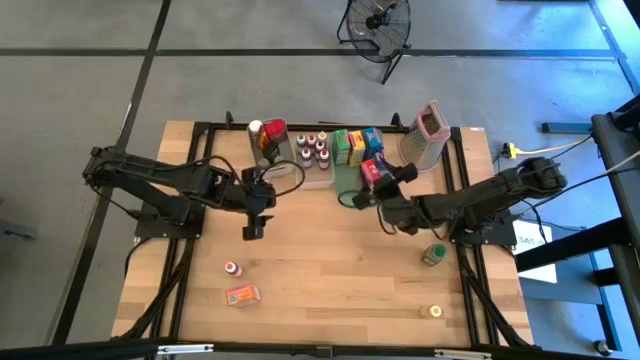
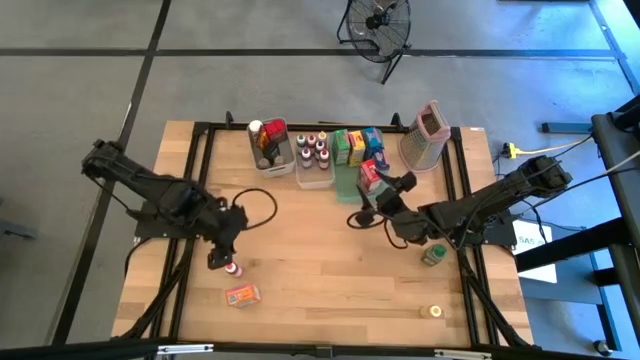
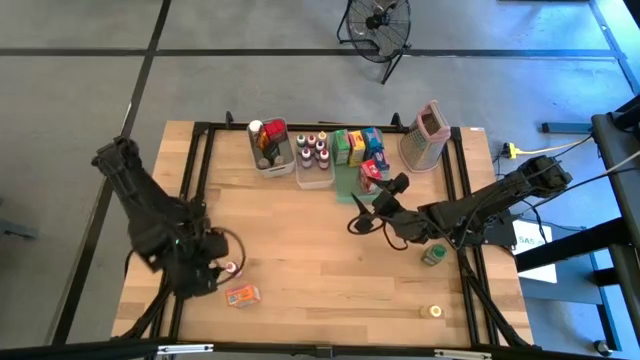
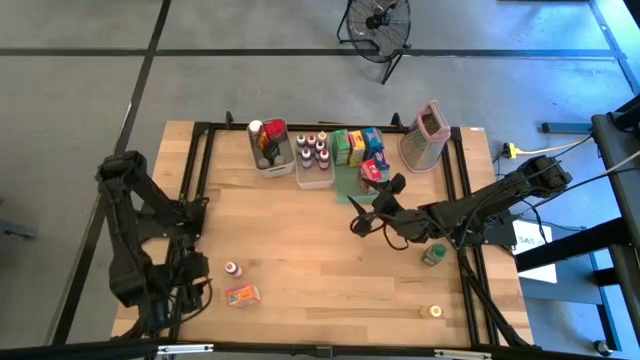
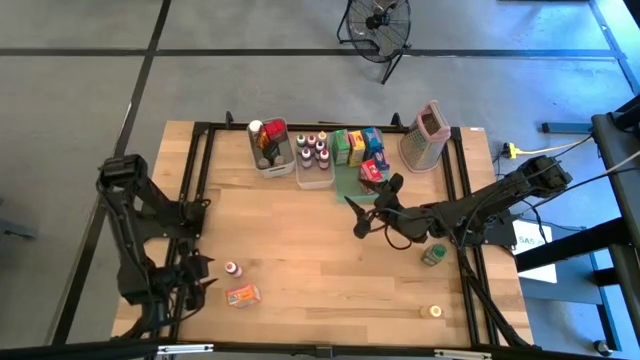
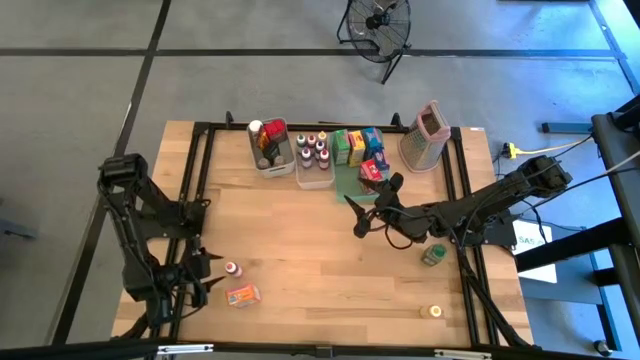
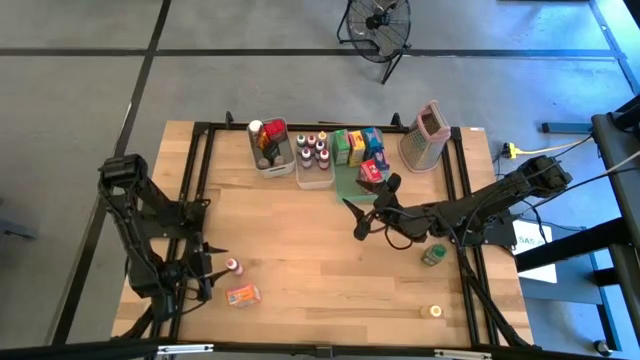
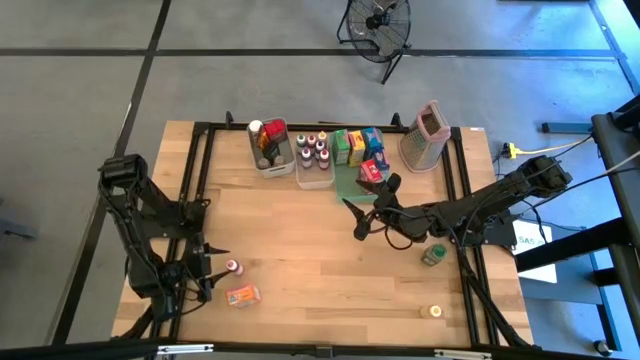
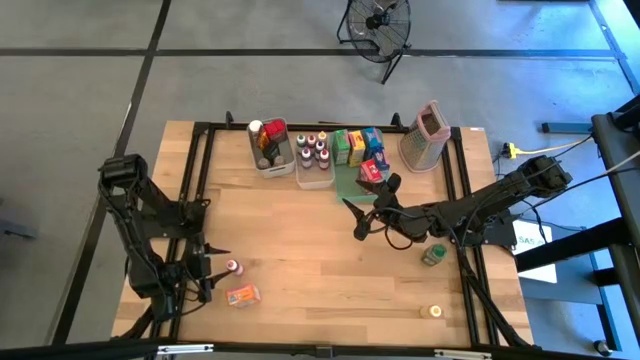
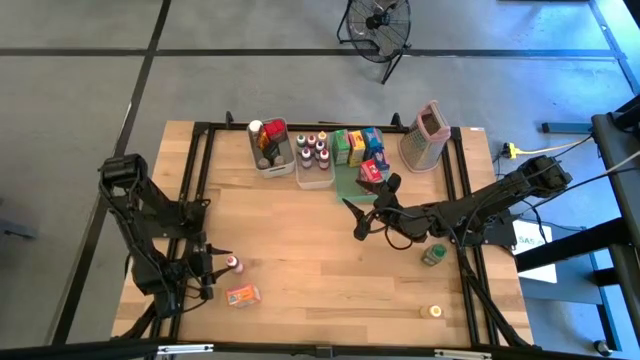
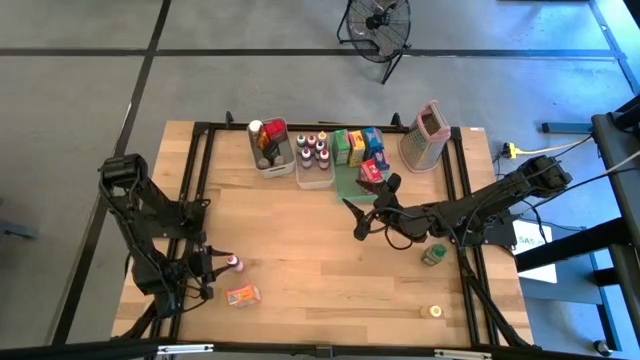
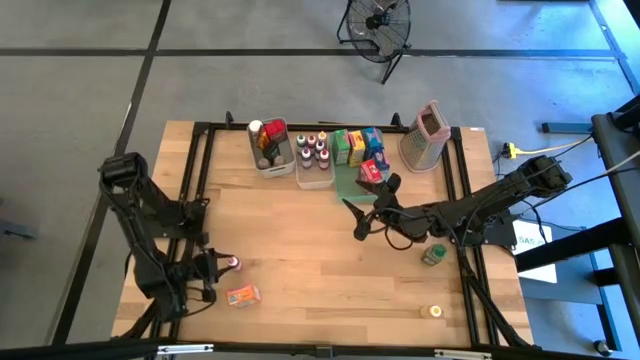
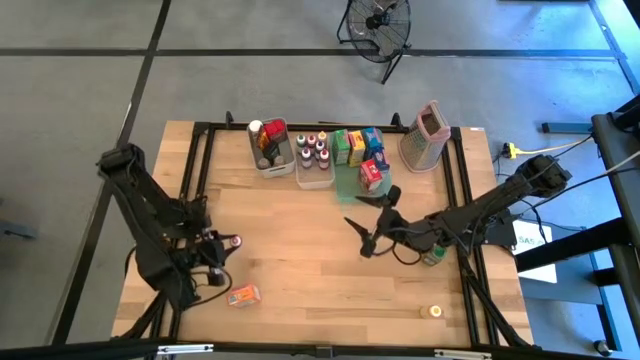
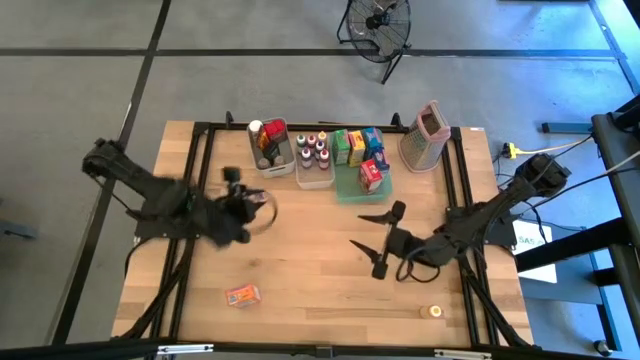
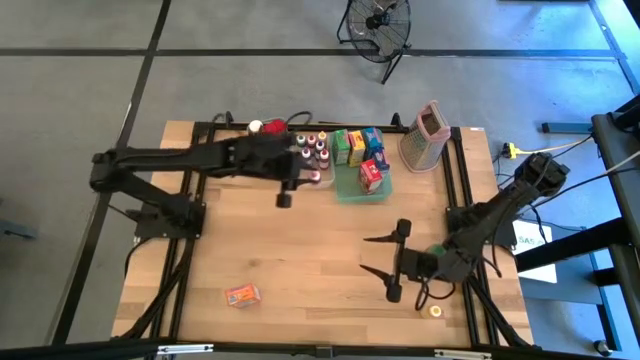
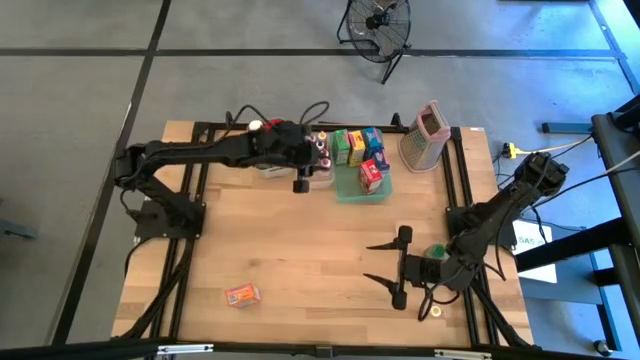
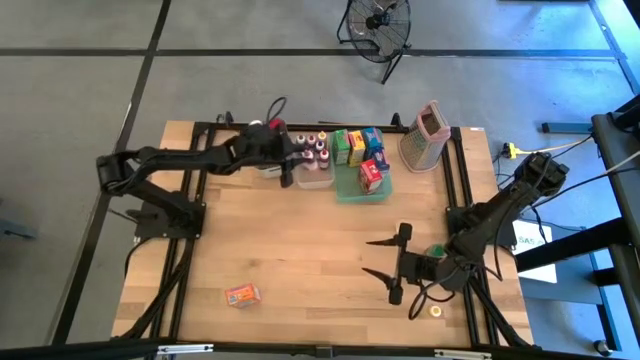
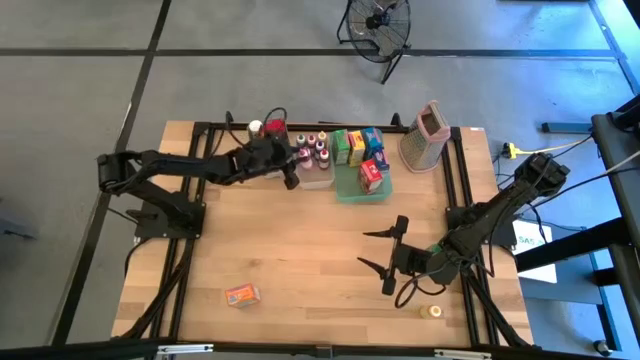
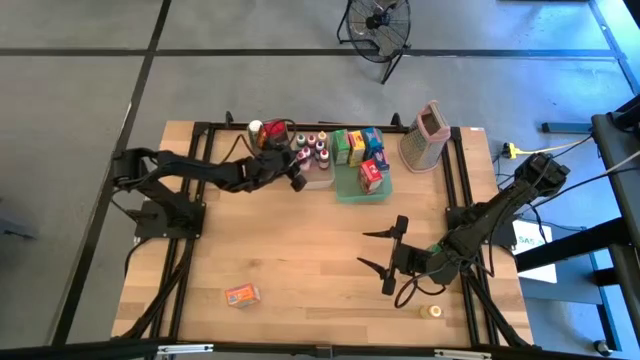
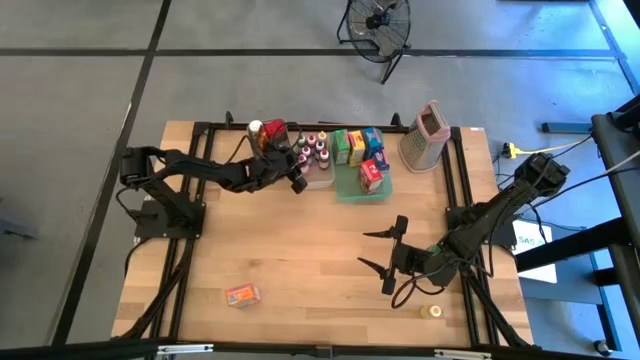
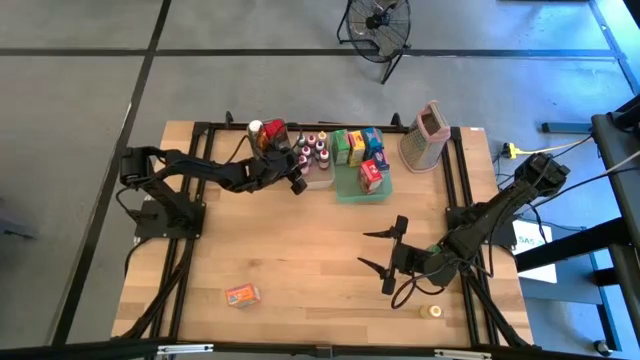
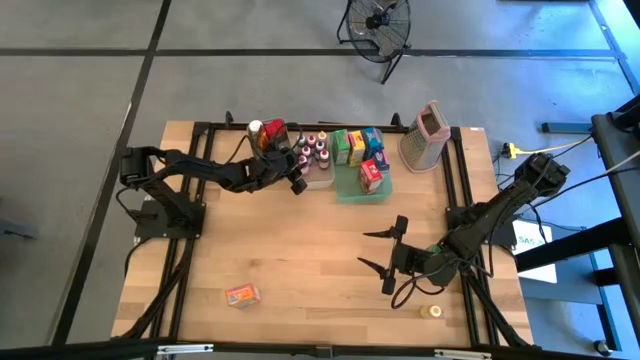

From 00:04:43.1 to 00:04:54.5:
Task: Pick & Place Kitchen Items
Put the pink food coloring bottle into the transparent bin

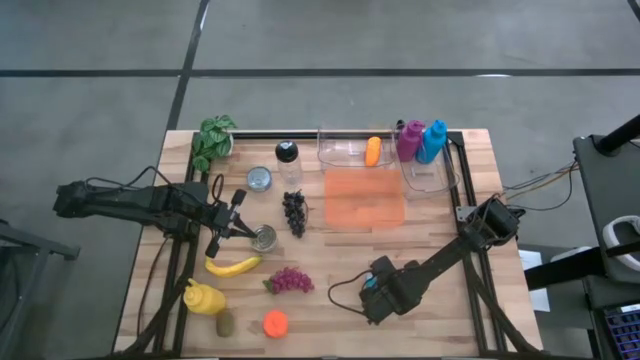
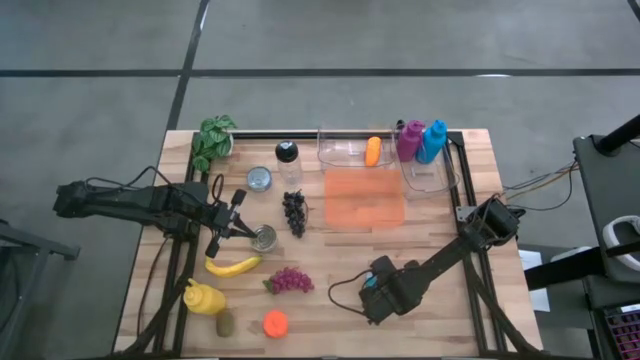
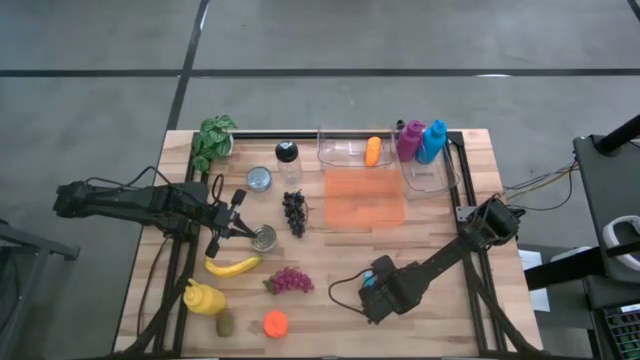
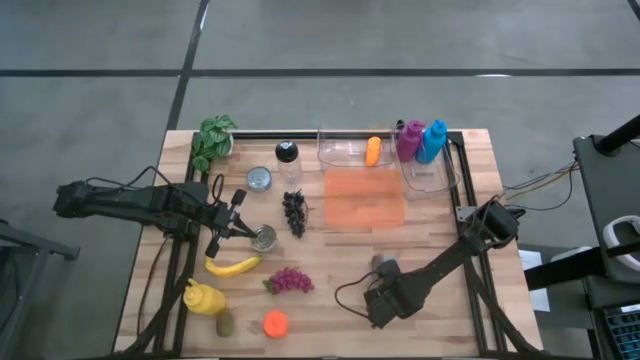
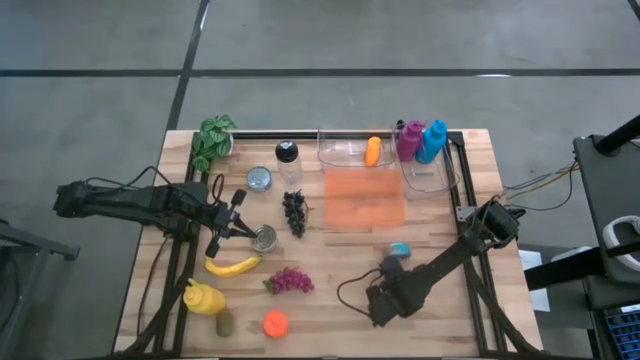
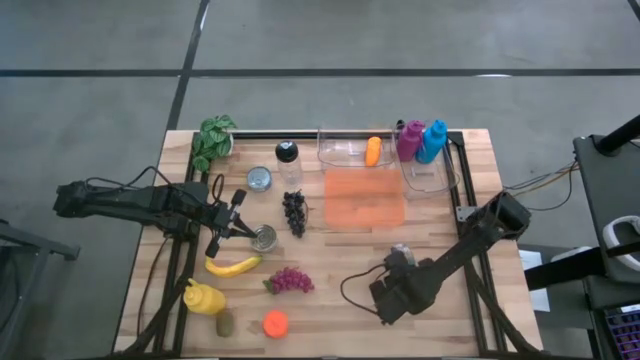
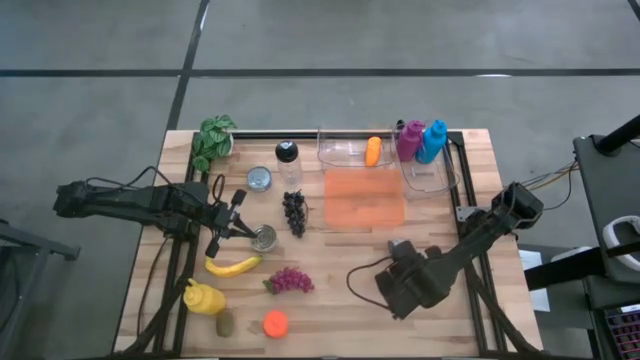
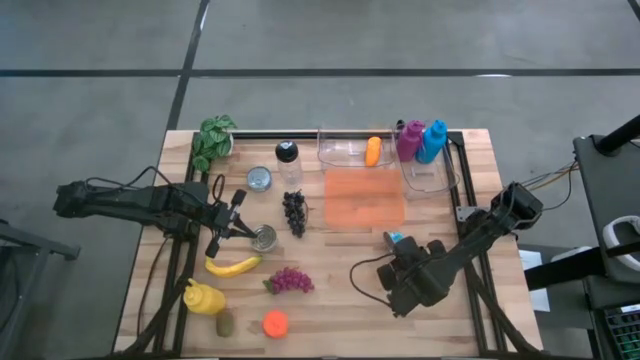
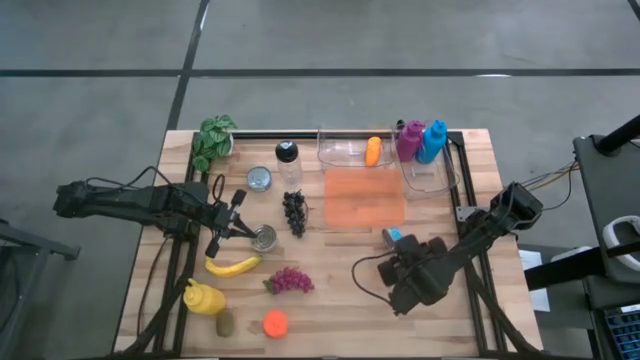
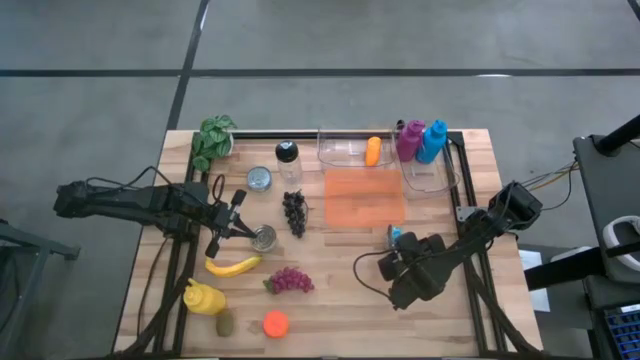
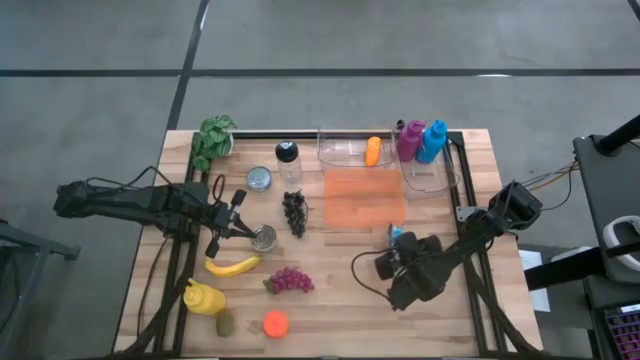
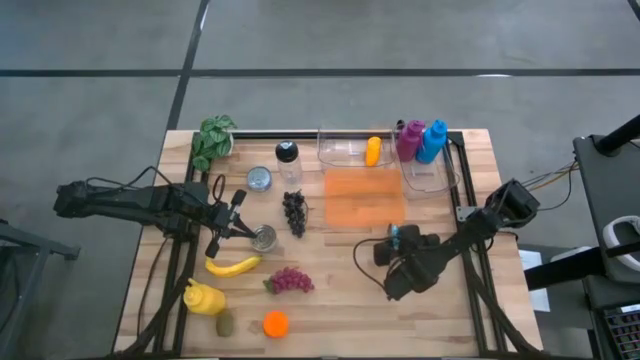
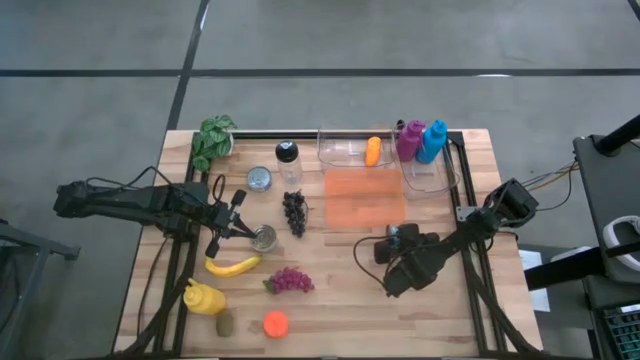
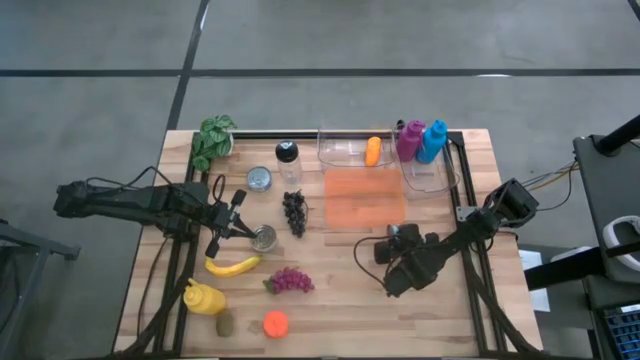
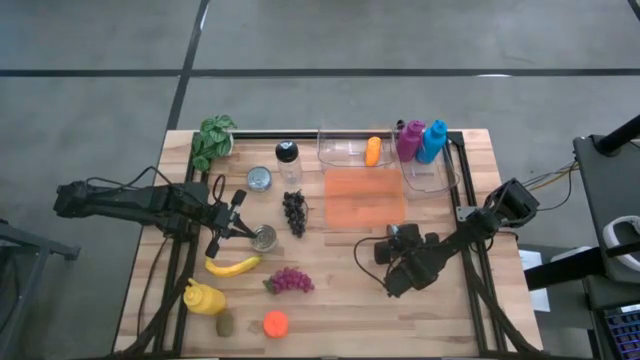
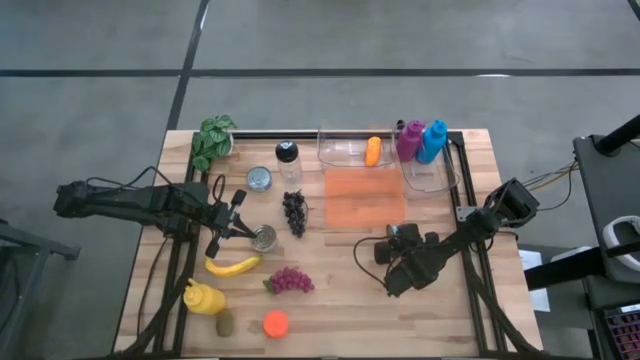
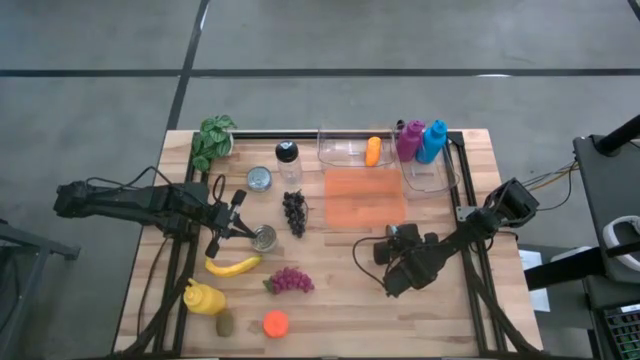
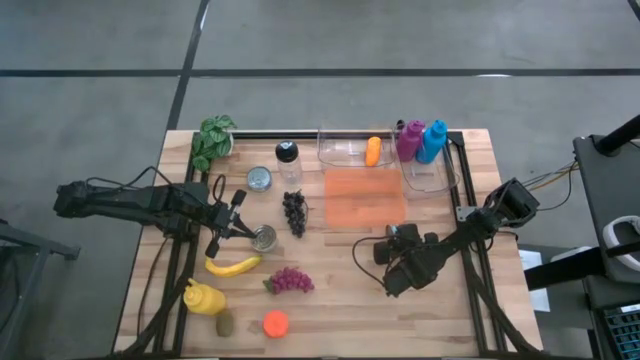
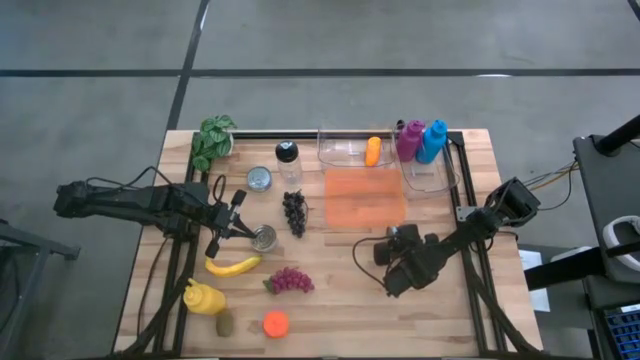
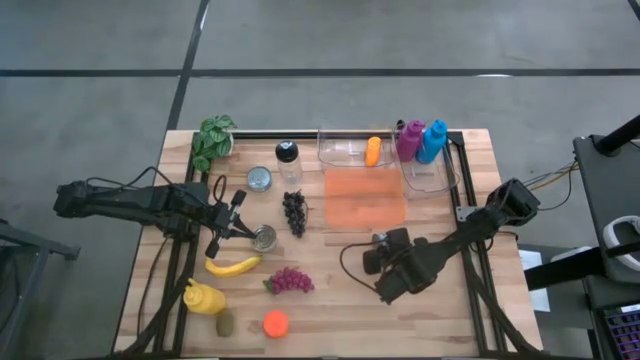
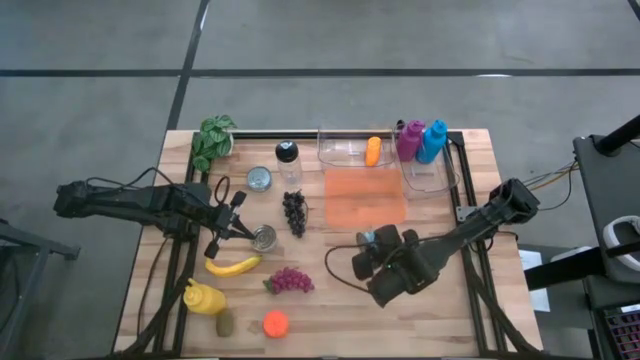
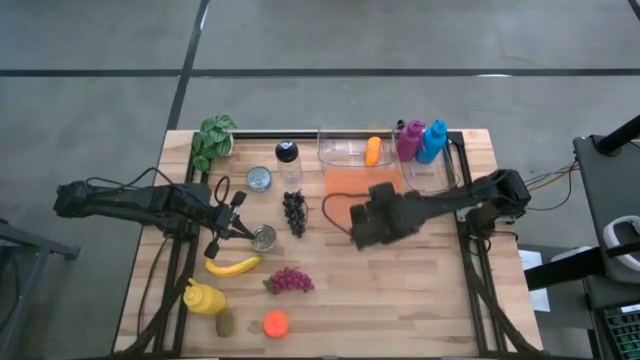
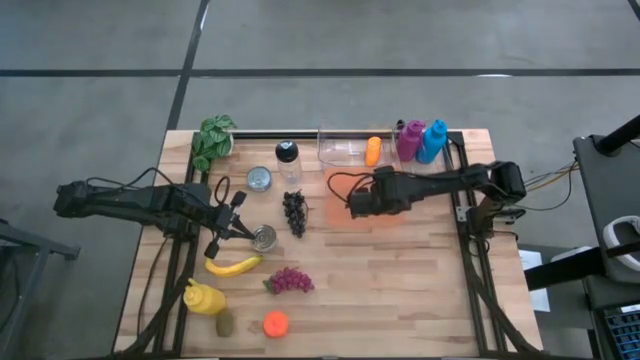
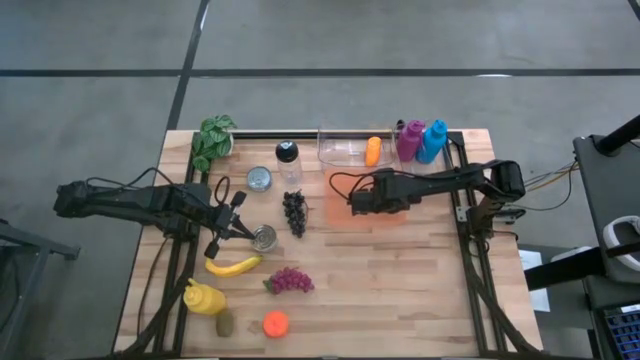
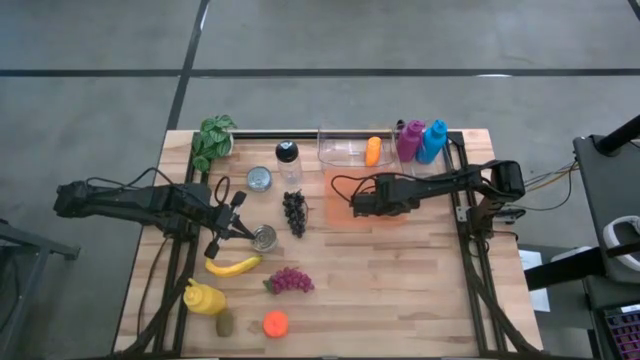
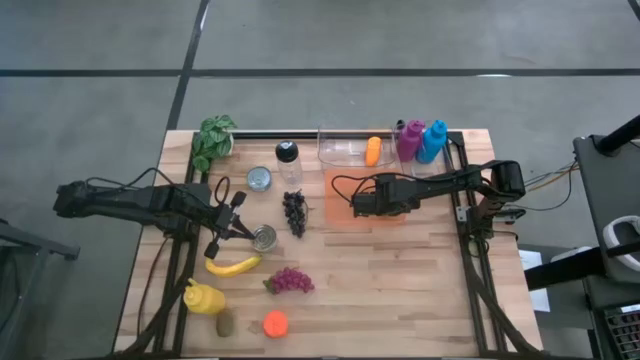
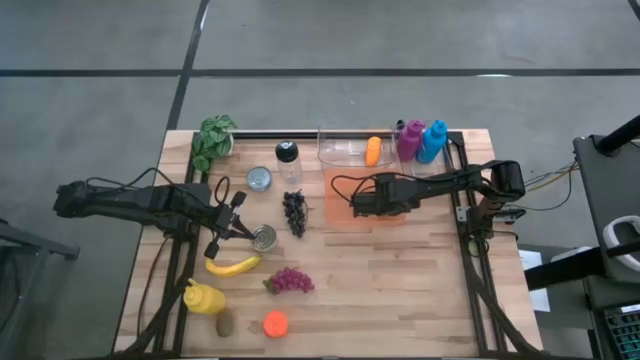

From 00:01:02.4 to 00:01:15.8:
Task: Pick & Place Food Item
Put the blue and yellow tuna can into the orange bin
